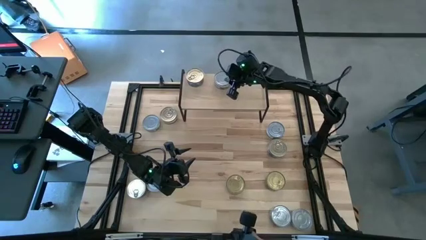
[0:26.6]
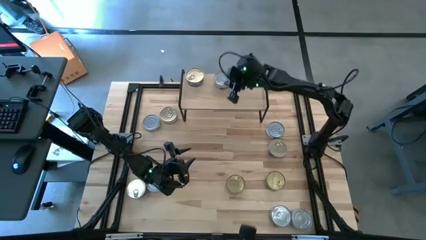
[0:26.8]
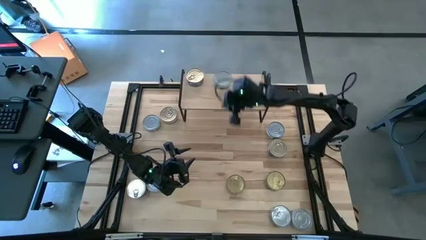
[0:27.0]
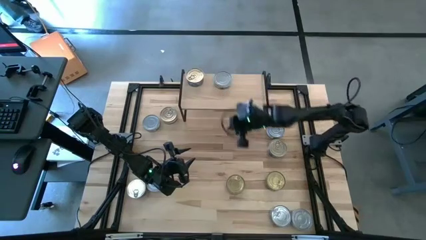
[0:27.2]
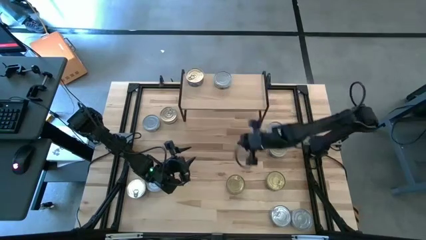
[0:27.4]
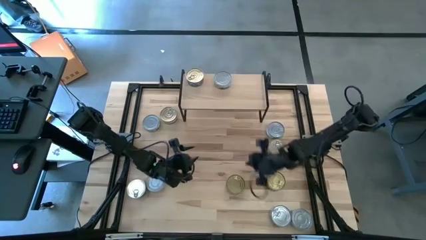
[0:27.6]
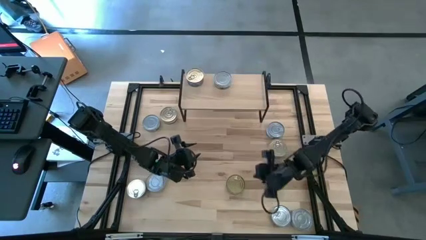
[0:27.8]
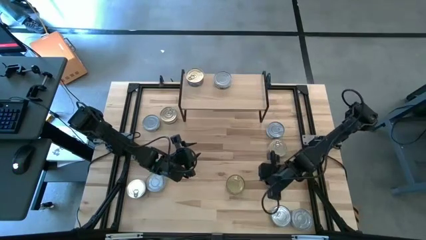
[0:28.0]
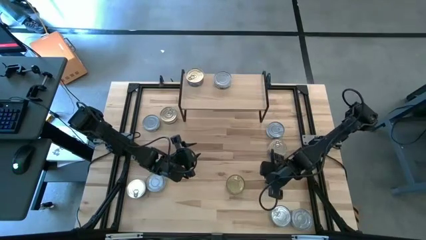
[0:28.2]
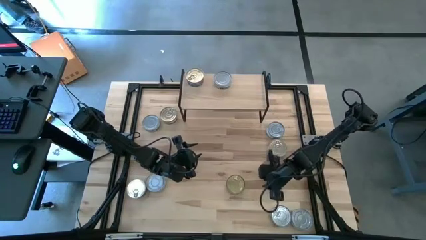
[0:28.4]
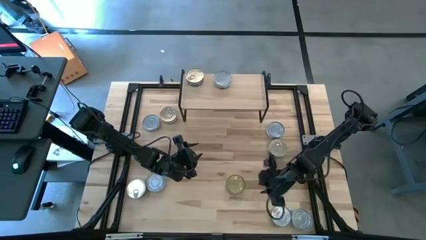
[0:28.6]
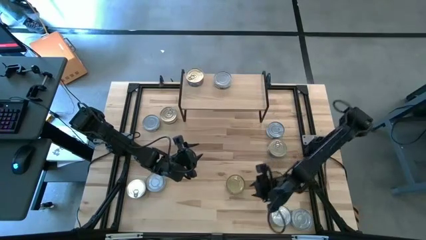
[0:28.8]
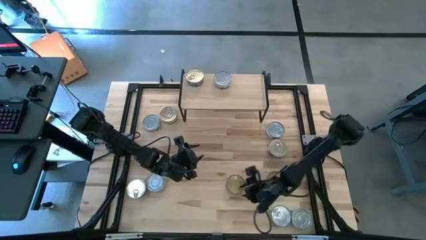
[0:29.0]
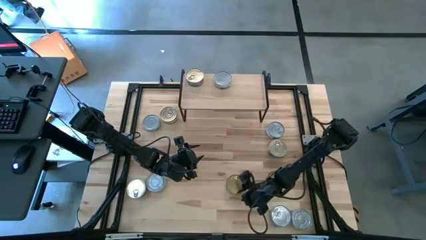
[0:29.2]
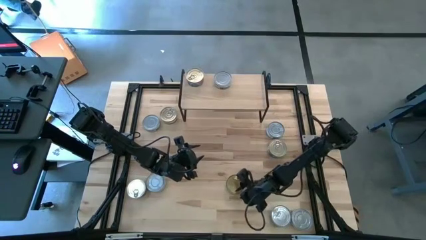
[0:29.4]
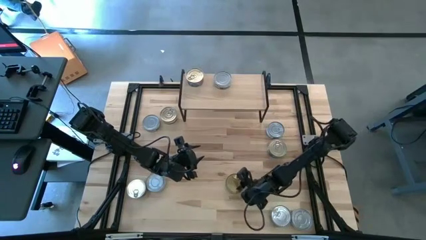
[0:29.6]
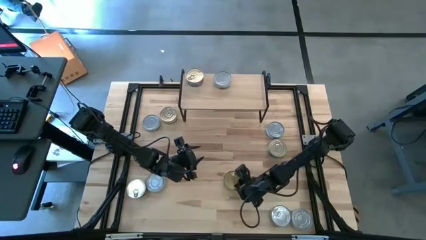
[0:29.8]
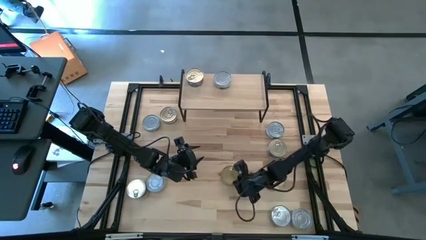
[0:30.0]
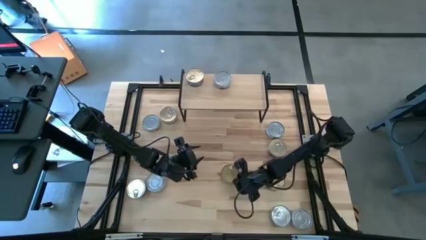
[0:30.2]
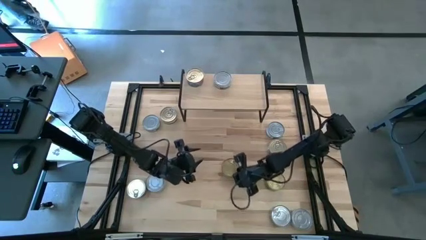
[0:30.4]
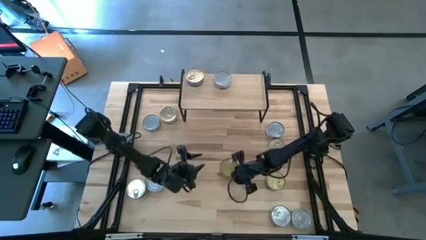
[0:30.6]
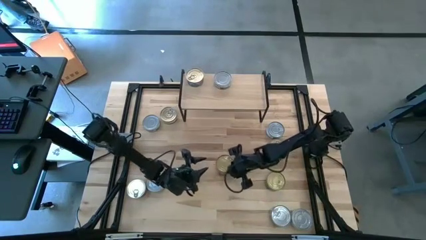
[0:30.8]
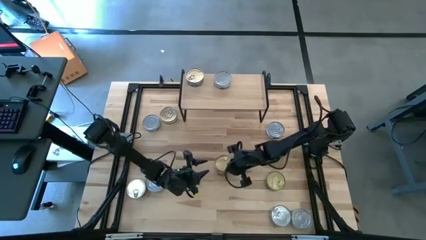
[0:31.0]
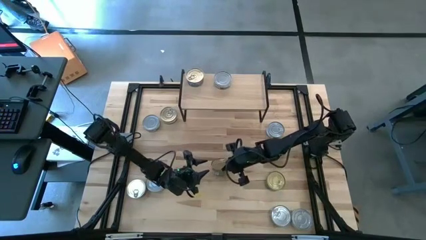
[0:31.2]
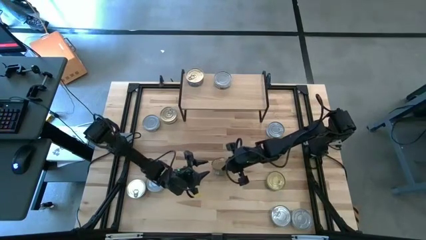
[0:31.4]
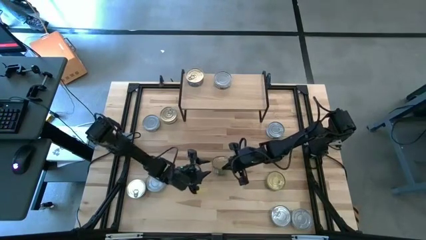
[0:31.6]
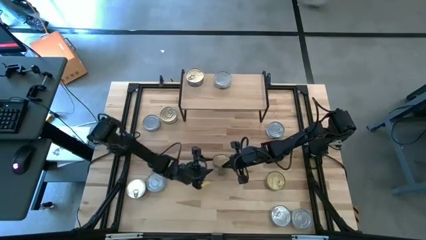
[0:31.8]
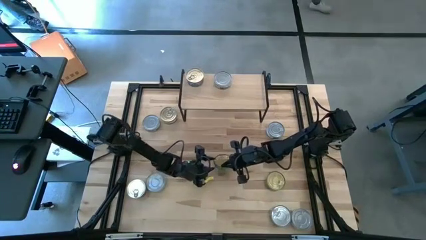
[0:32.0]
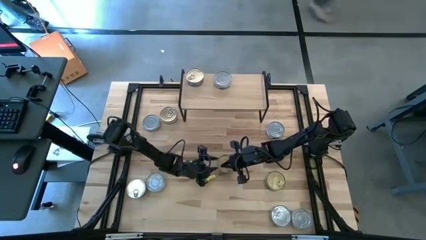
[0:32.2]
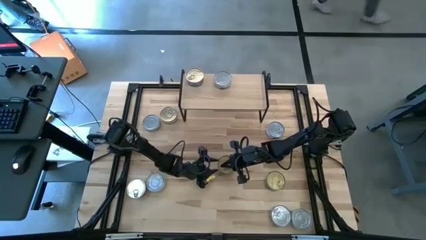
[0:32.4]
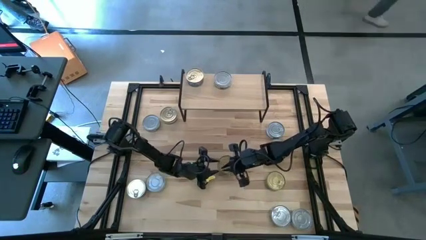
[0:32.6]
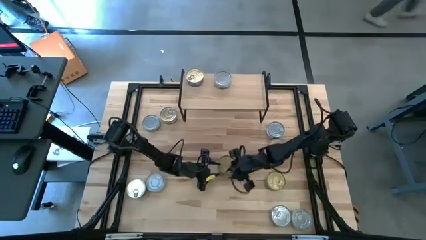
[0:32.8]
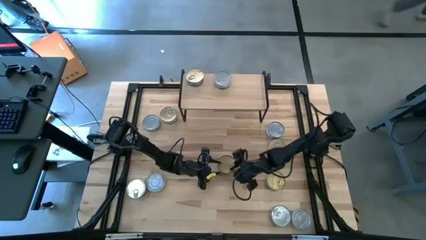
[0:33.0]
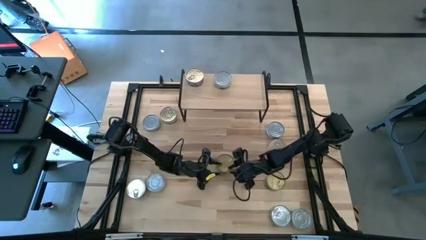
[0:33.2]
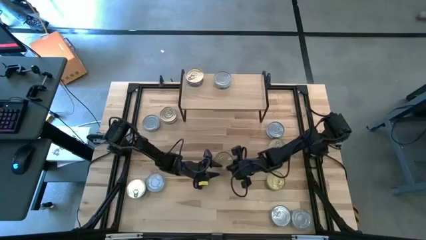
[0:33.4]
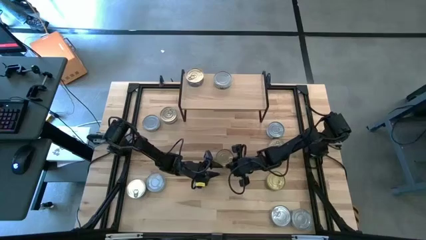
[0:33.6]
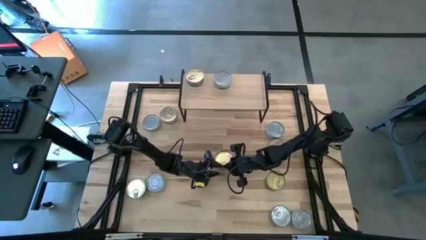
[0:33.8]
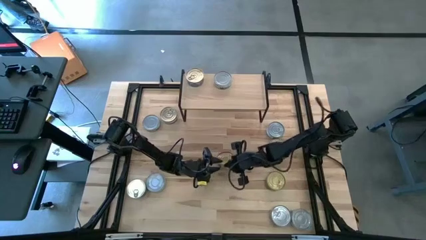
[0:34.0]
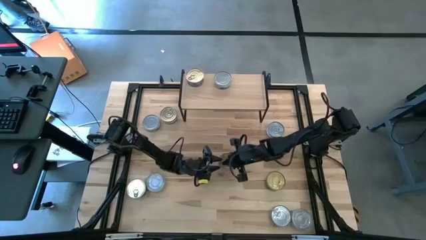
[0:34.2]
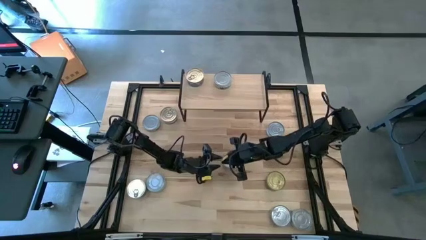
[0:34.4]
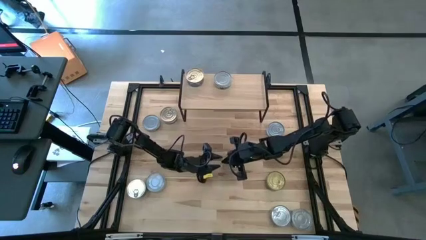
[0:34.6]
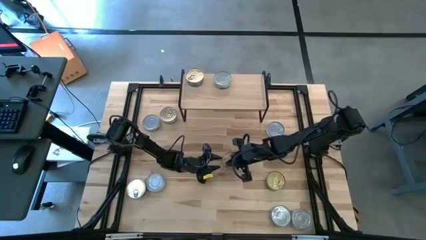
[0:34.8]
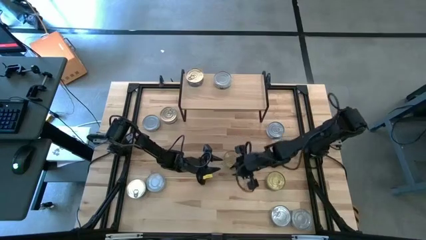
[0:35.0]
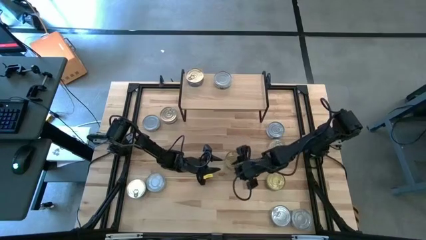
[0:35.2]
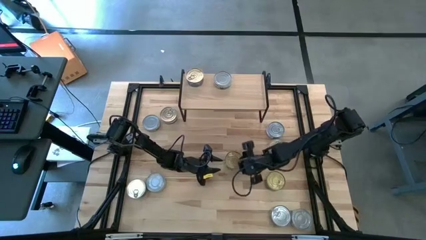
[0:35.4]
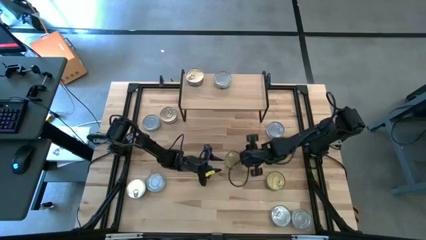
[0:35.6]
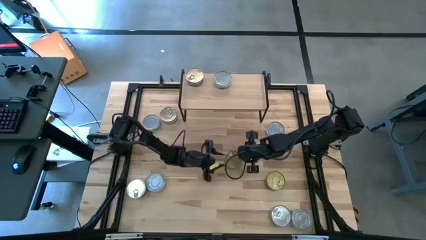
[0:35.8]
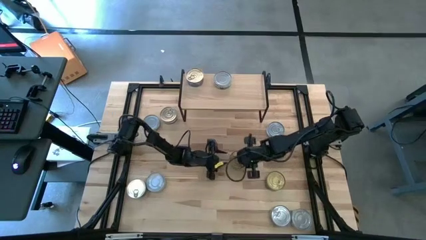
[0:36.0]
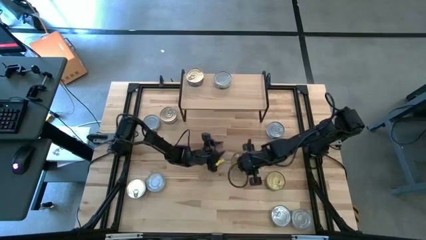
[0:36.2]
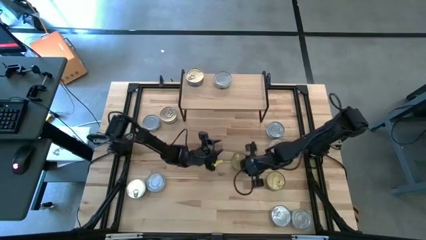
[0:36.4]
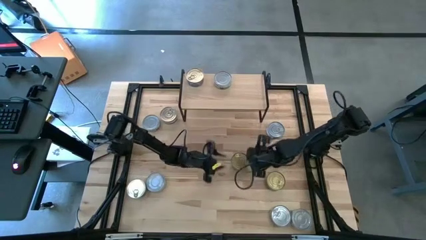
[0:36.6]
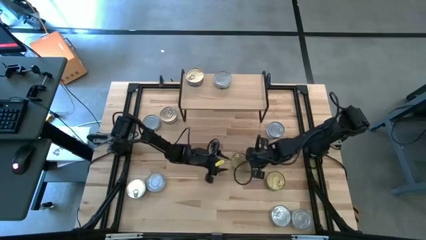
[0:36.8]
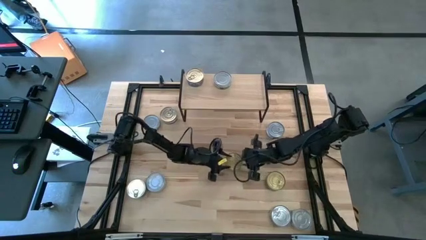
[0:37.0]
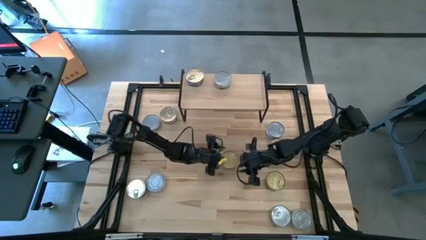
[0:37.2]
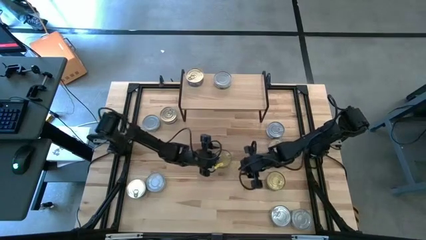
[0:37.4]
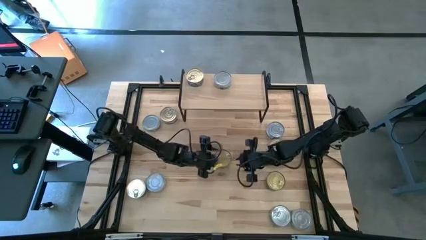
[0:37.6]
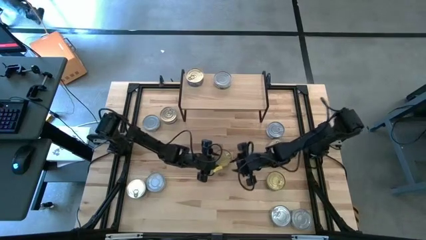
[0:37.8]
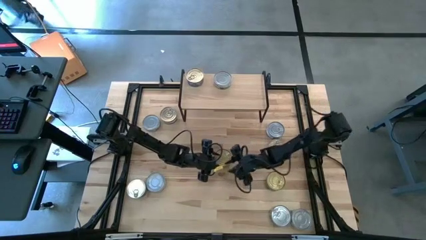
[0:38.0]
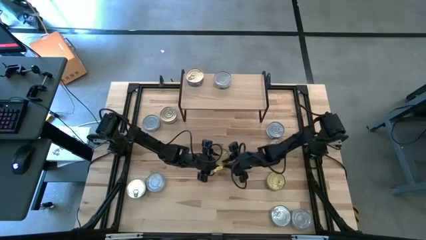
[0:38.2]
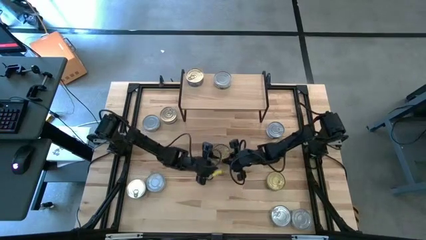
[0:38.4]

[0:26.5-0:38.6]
Task: Stack canned seafood by type on shelf
Put the green with blue patterned tuna can on the shelf

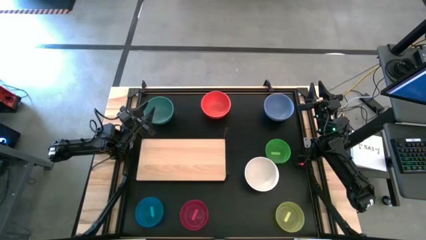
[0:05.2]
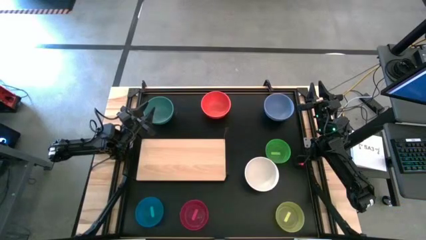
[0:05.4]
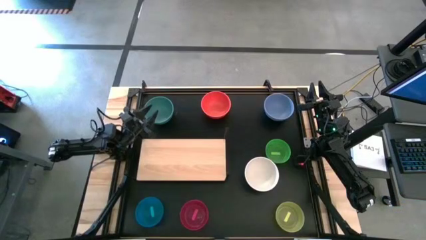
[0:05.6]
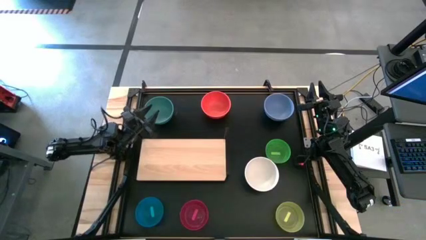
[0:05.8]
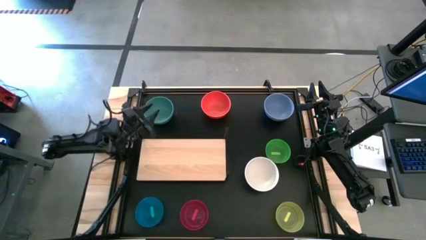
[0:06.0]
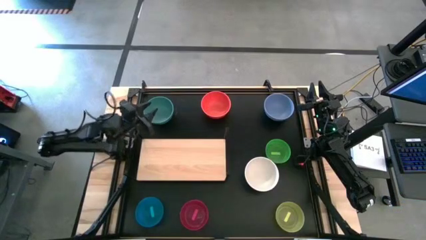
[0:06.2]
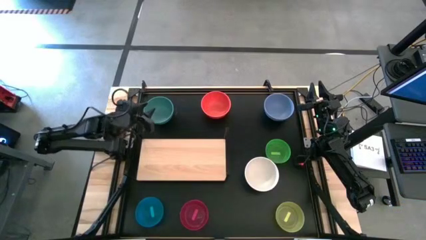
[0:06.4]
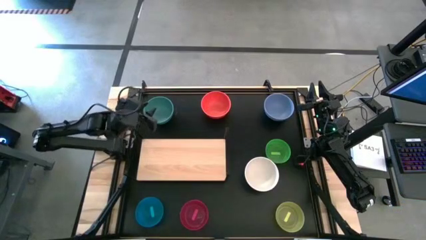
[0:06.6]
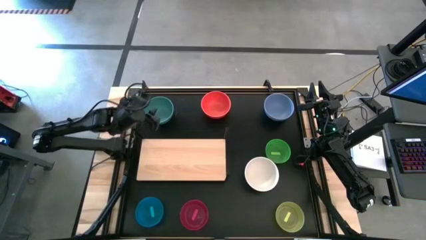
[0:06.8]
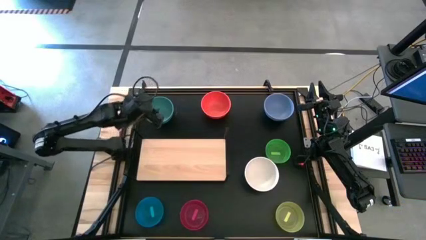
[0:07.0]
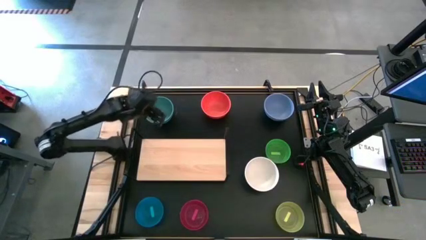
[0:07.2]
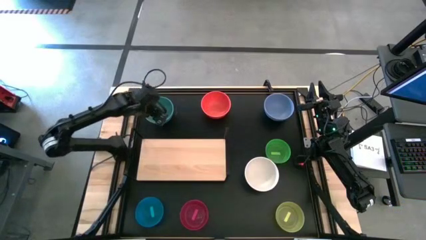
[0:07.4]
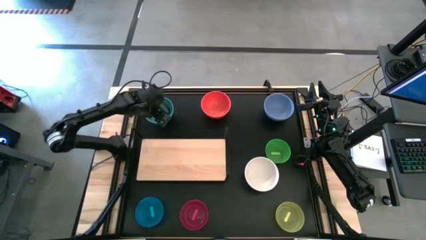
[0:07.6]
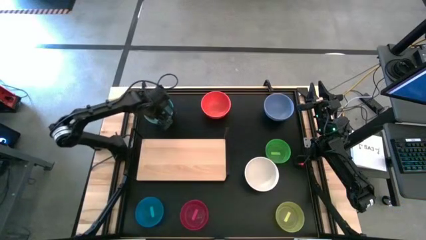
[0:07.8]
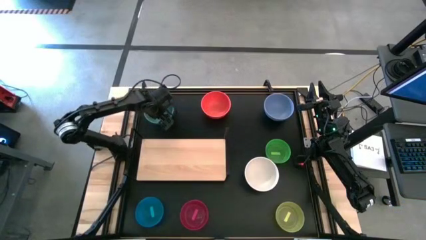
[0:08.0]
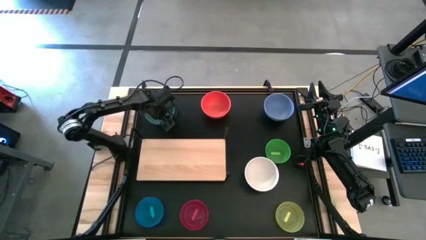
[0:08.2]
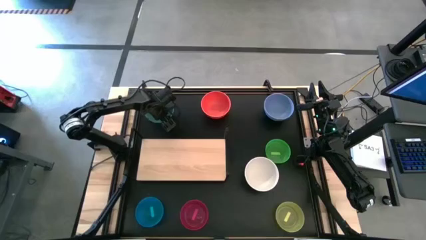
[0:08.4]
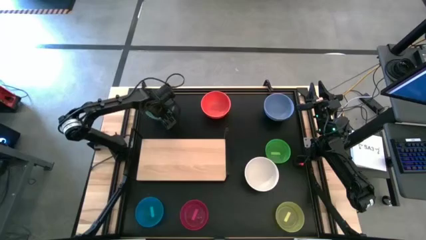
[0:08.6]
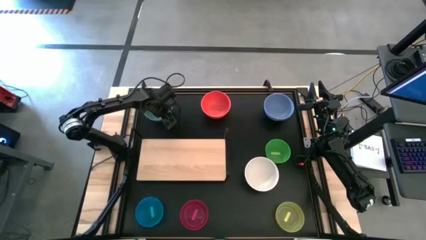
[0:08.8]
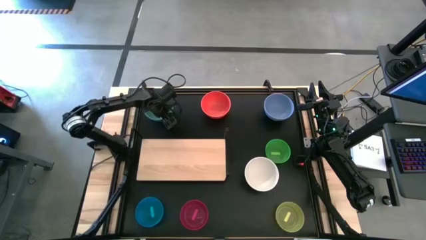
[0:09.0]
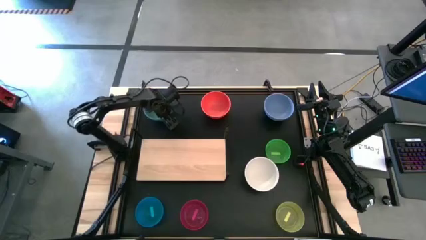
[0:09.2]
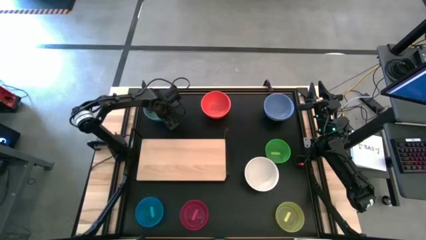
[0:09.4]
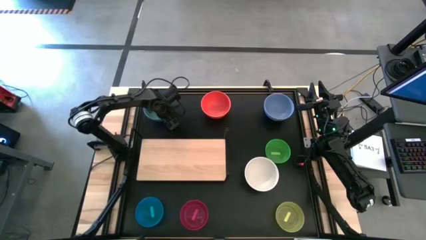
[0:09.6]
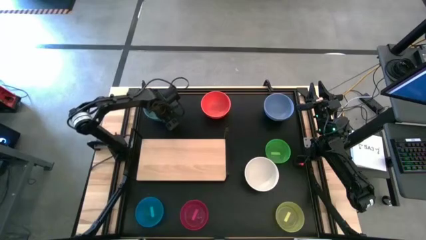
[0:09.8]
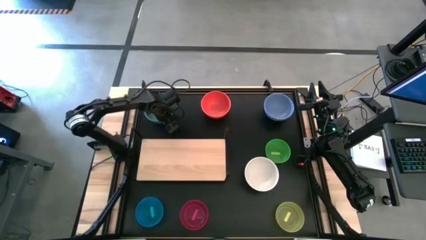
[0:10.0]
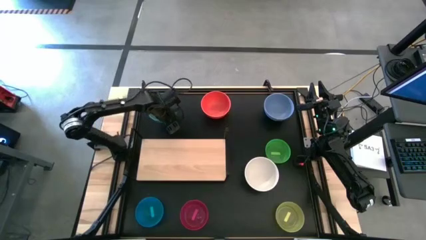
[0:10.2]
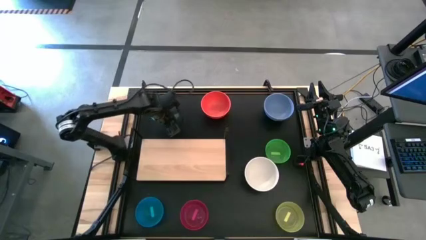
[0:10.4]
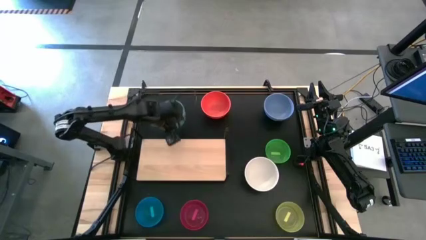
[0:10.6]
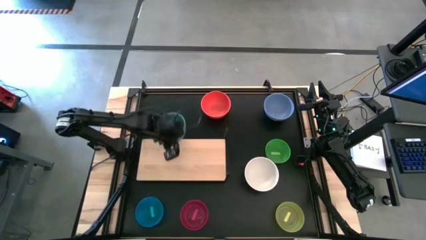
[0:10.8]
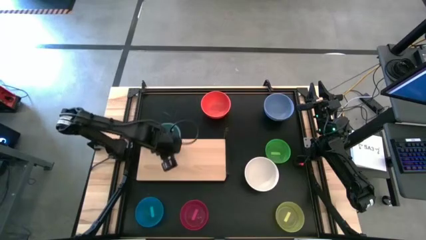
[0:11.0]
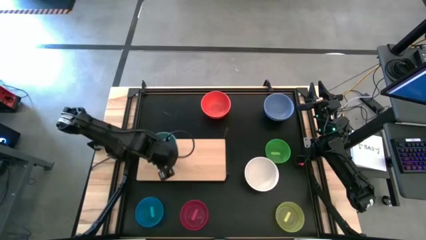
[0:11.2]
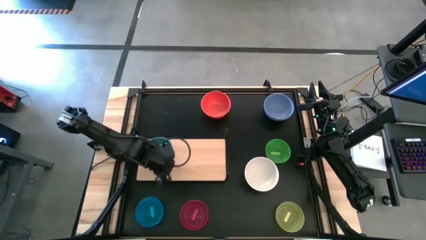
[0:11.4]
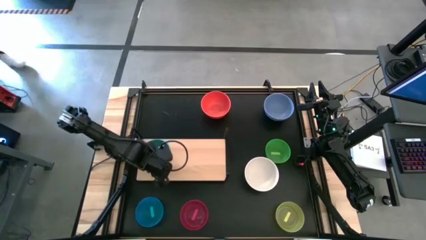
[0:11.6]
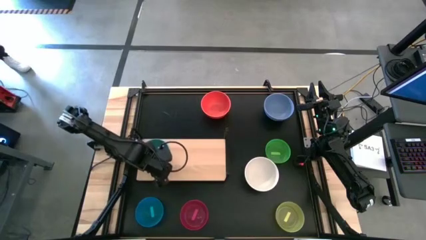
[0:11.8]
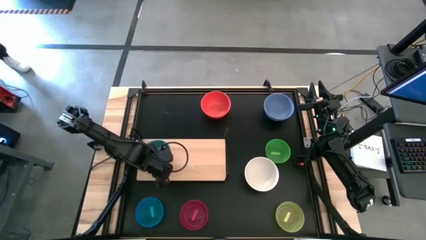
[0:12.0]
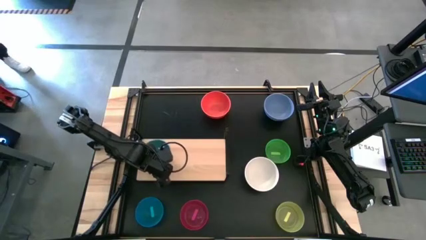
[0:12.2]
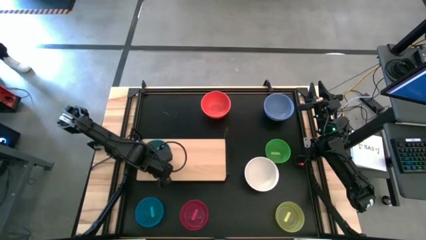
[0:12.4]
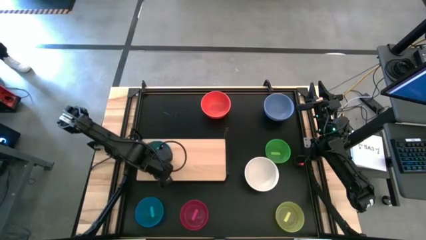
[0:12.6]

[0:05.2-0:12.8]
Task: Place and stack bowls onto a shelf
Put the green bowl on the shelf
